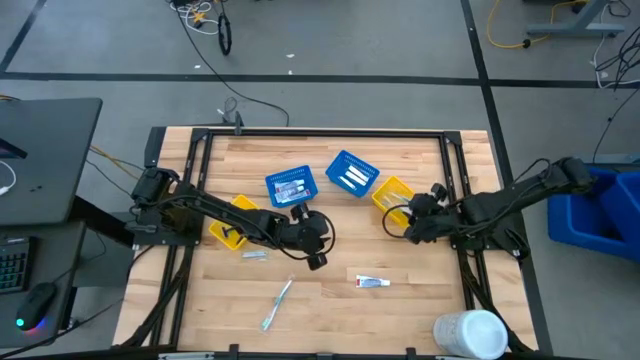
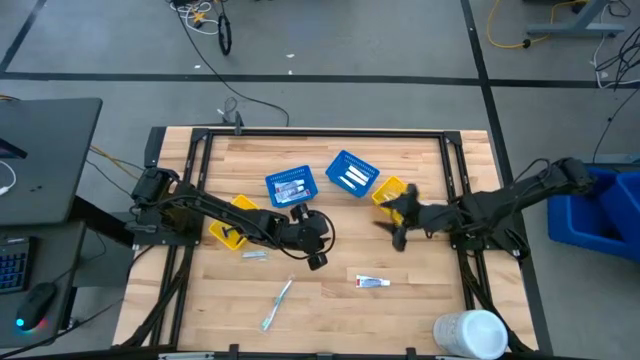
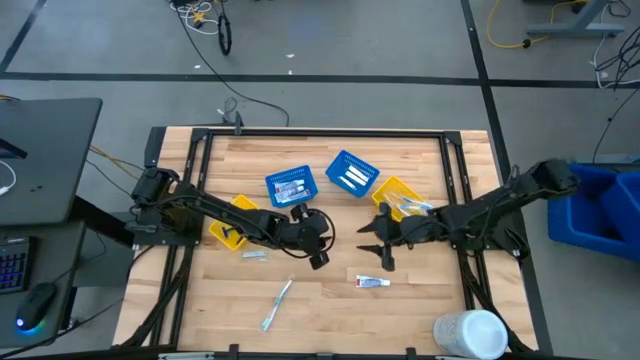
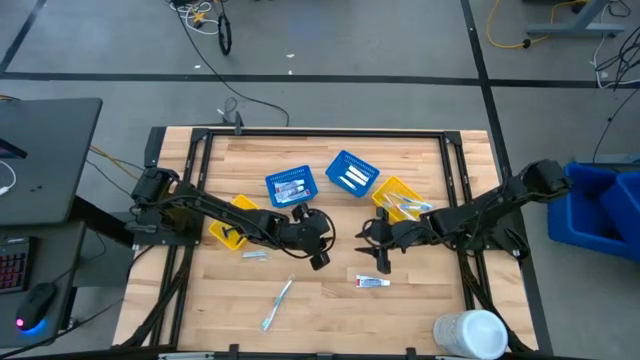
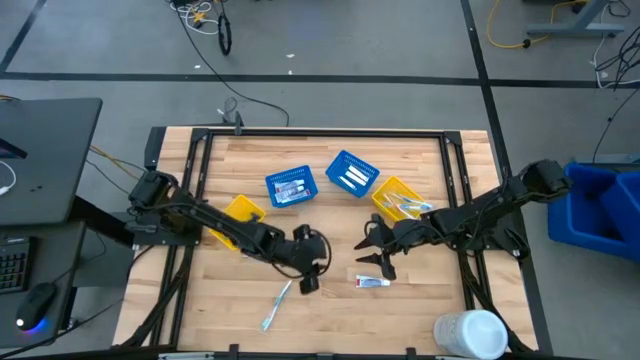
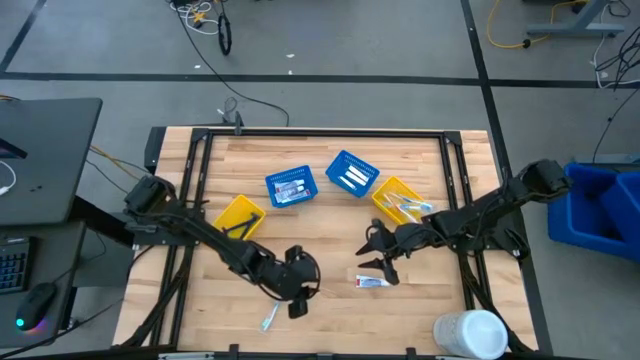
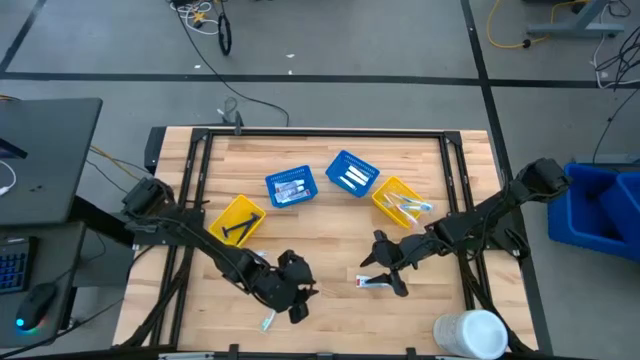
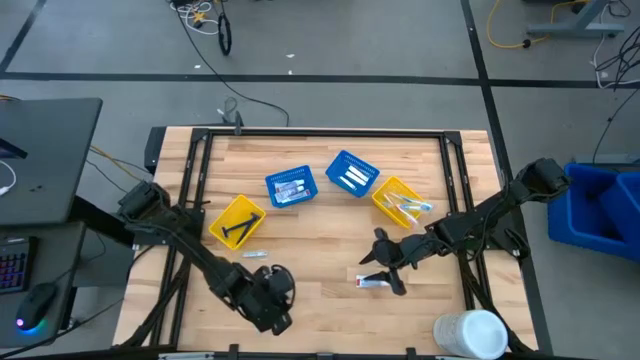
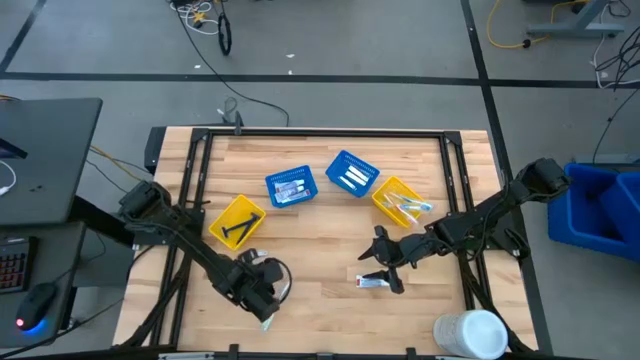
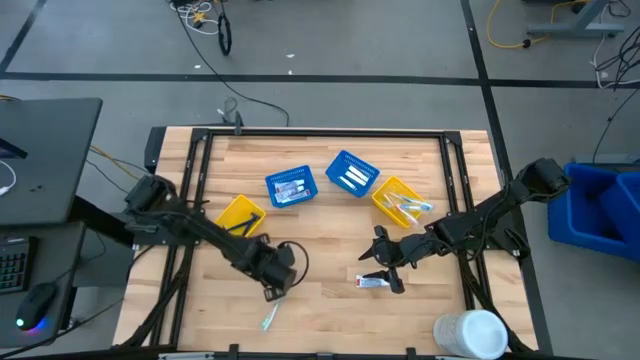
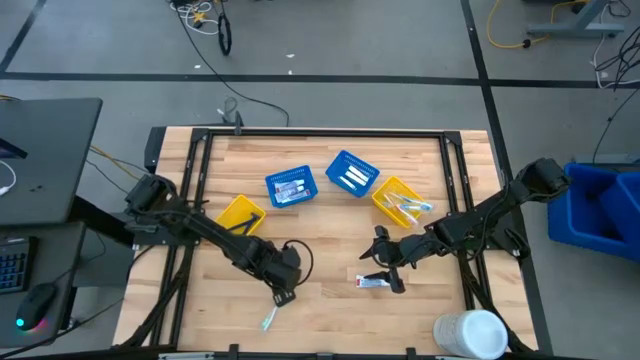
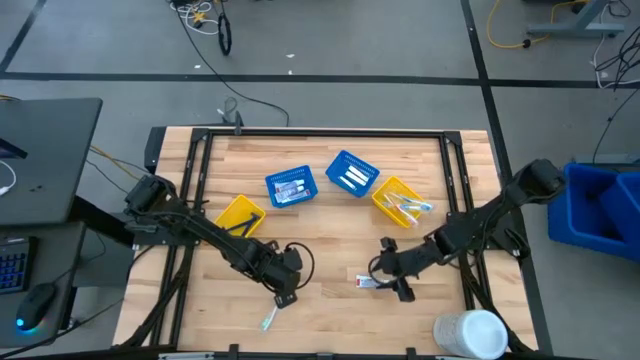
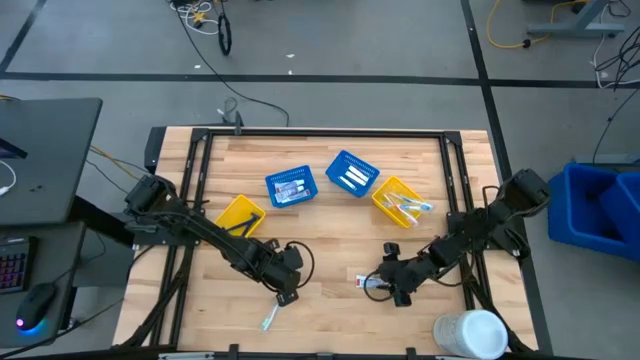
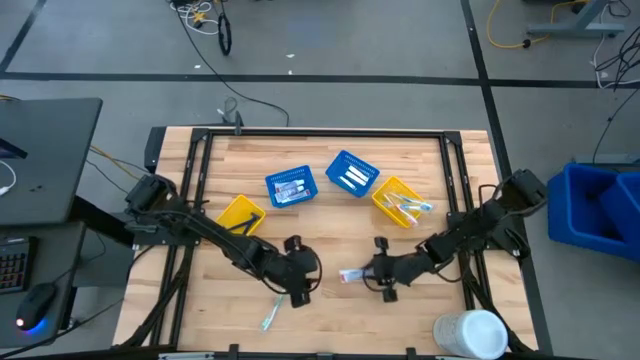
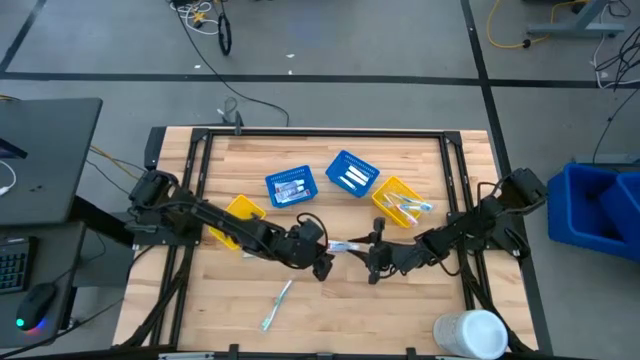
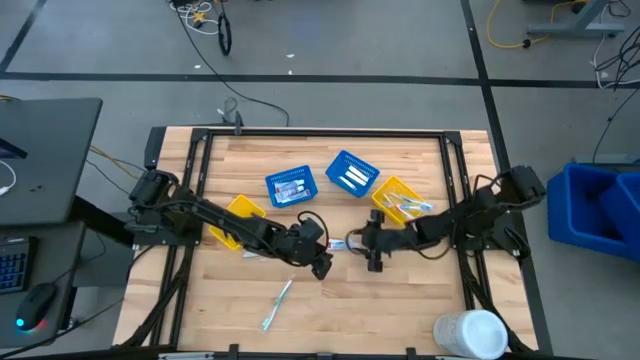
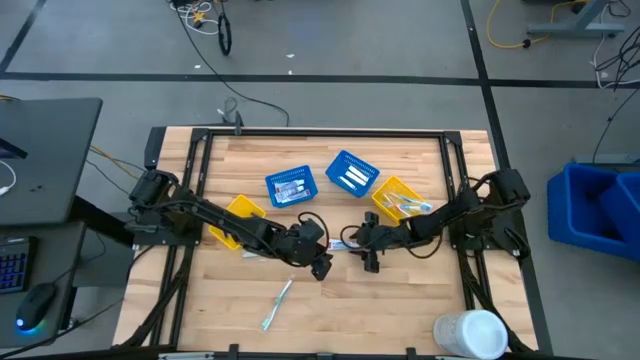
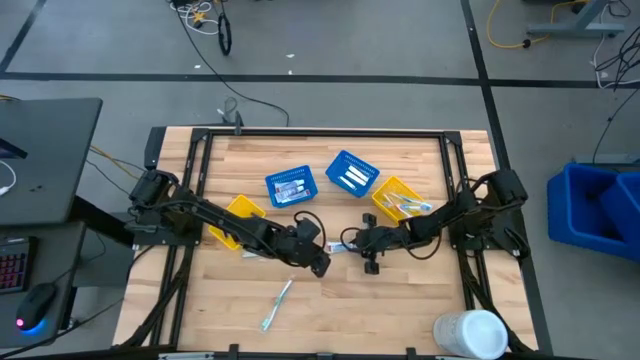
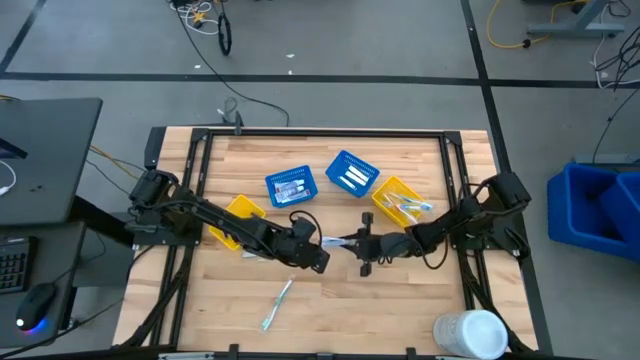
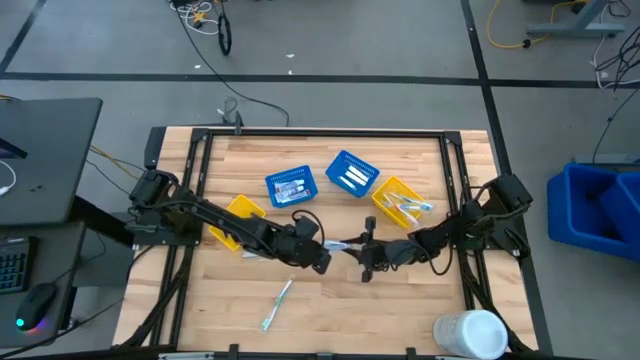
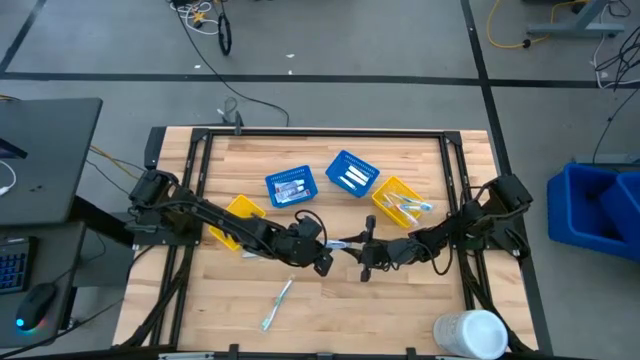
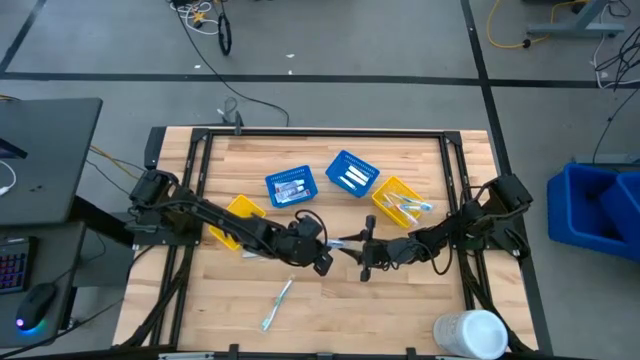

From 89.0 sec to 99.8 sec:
Task: Pick & Place Travel size toiletries
Put the white toothpaste into the left blue bin

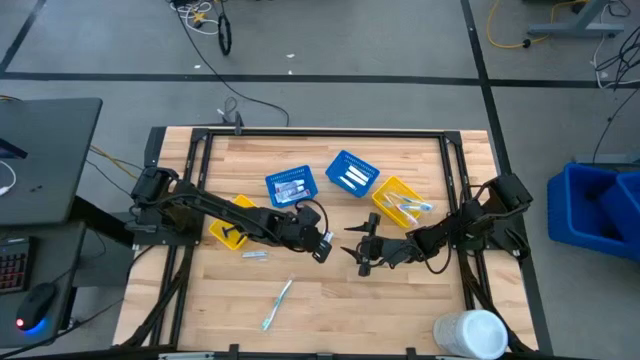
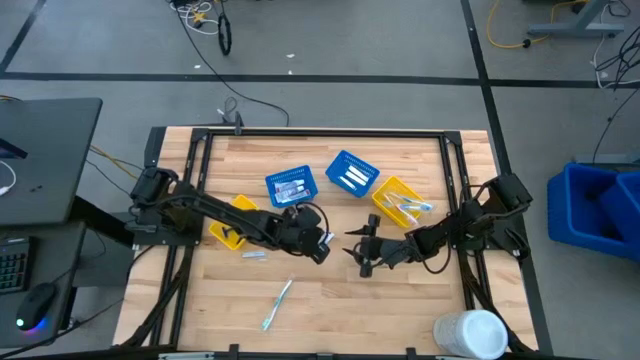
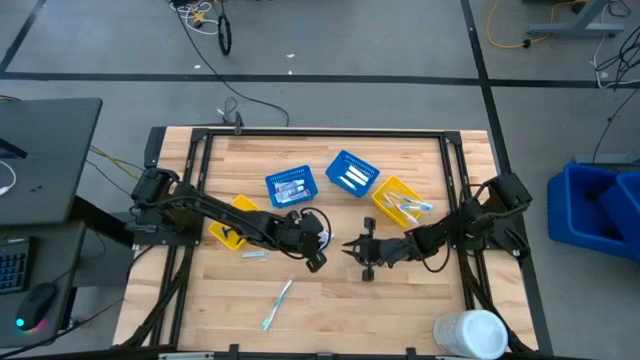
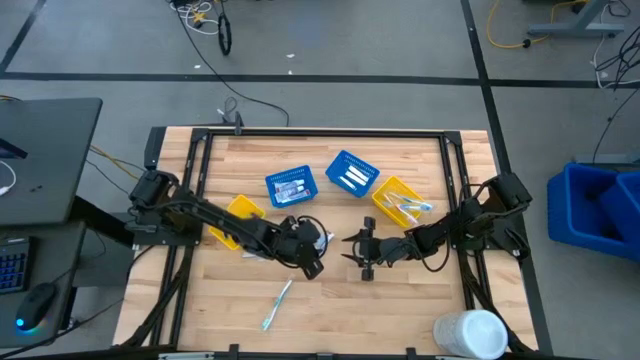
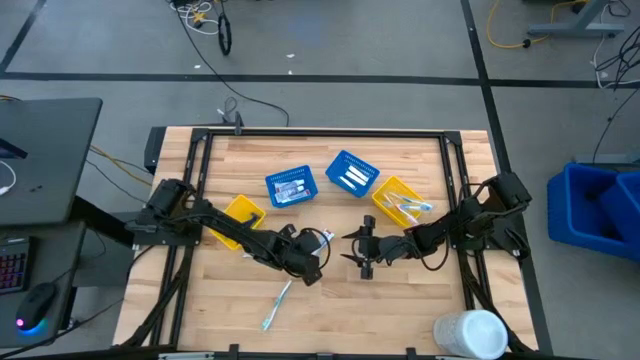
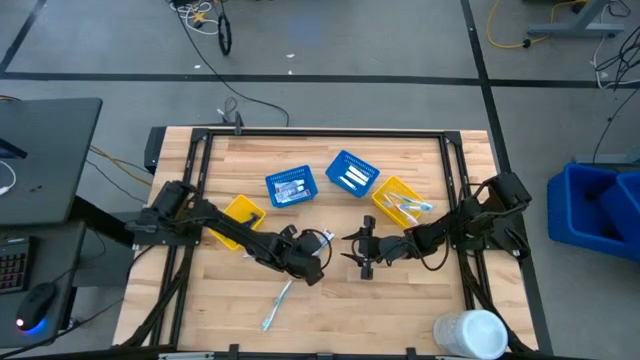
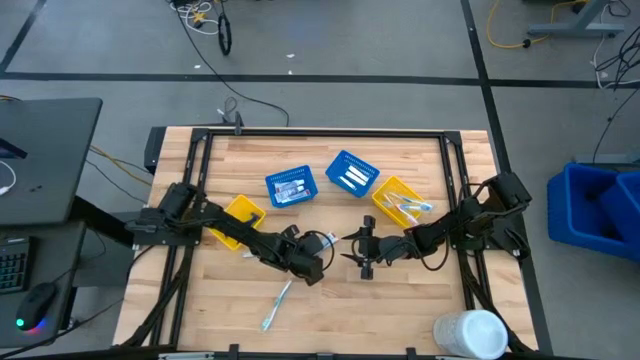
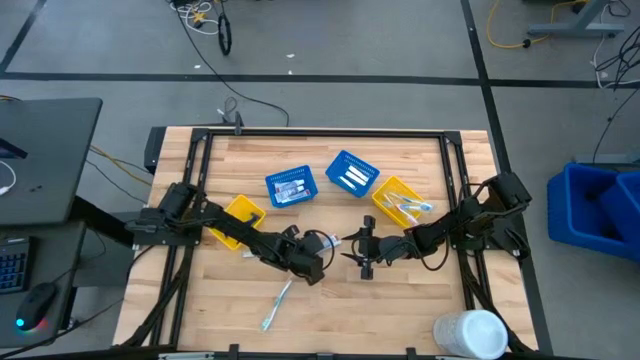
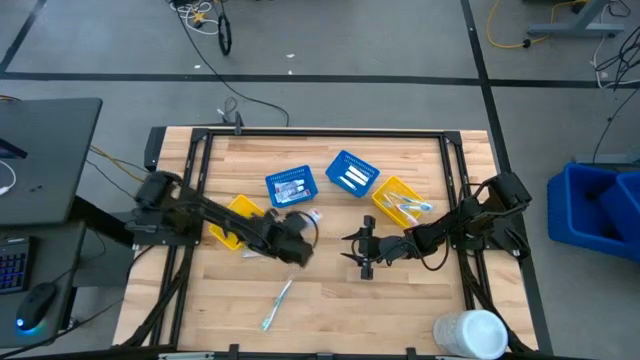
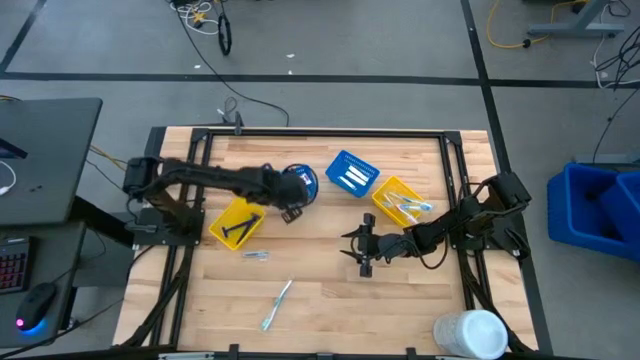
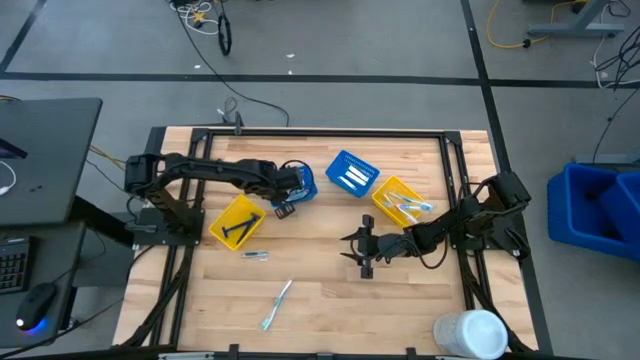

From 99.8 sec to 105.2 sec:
Put the white toothpaste into the left blue bin

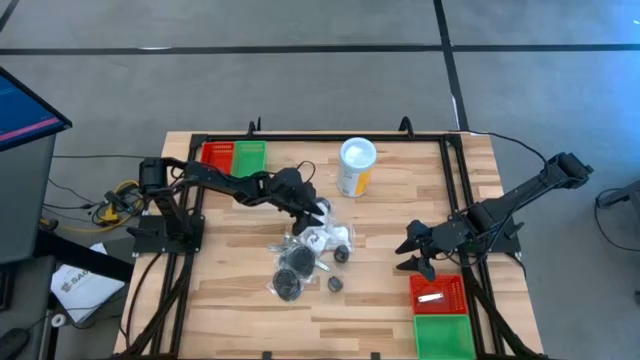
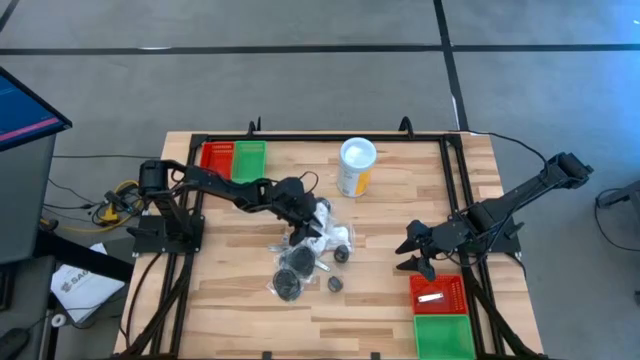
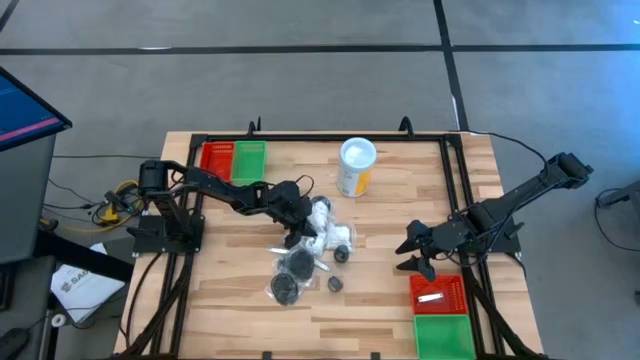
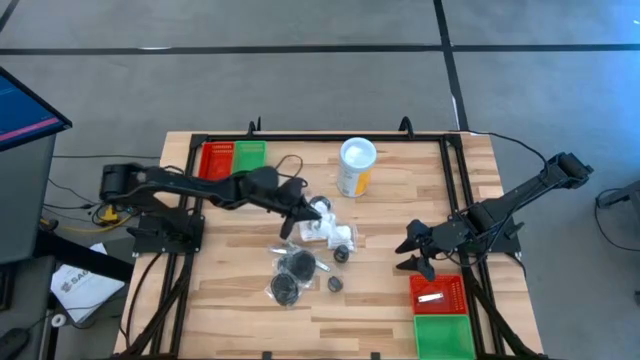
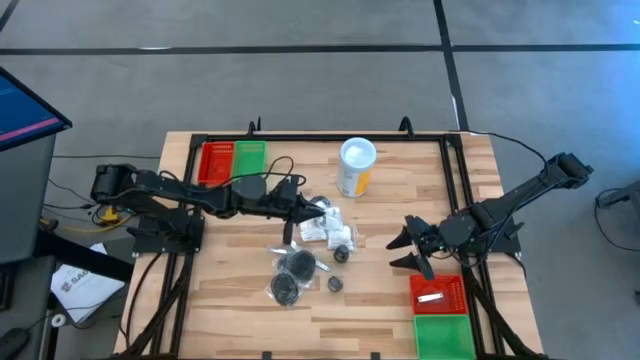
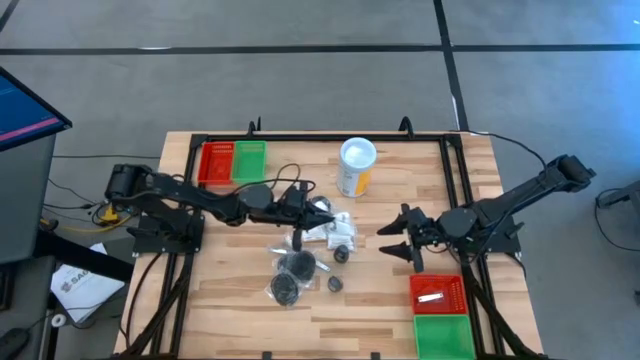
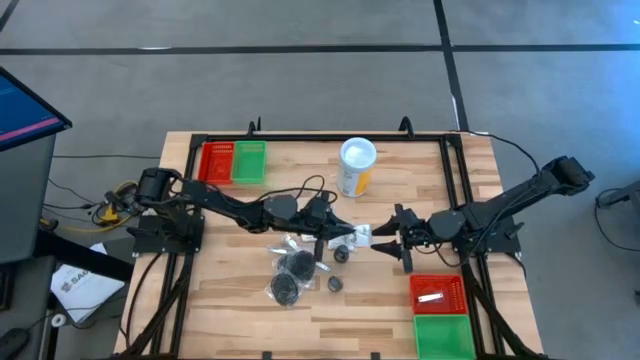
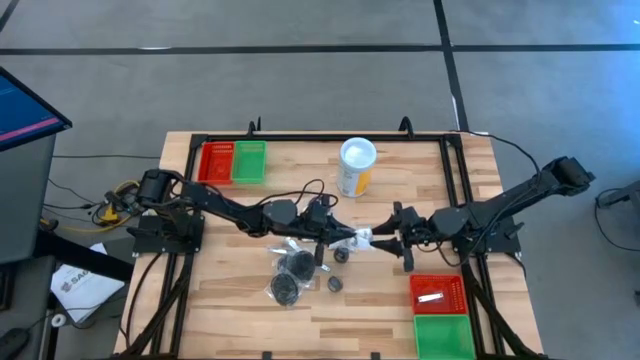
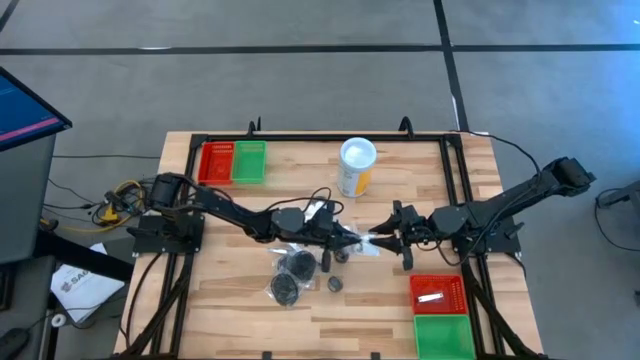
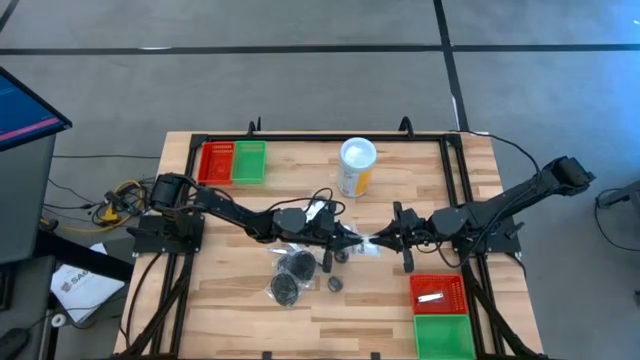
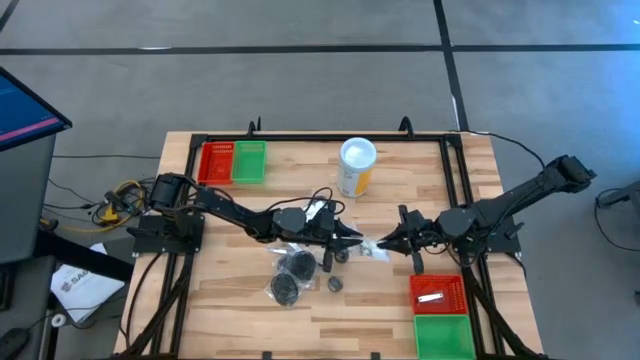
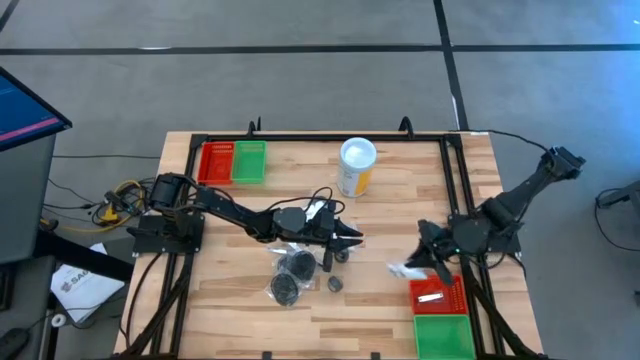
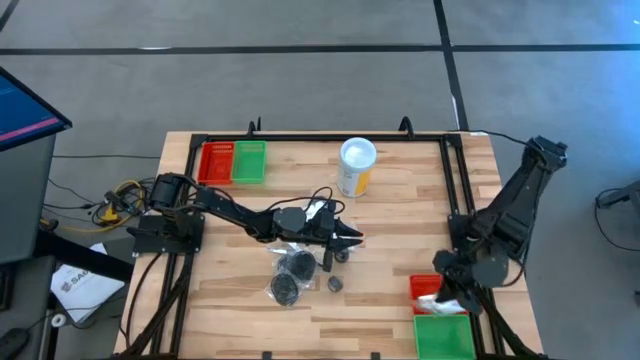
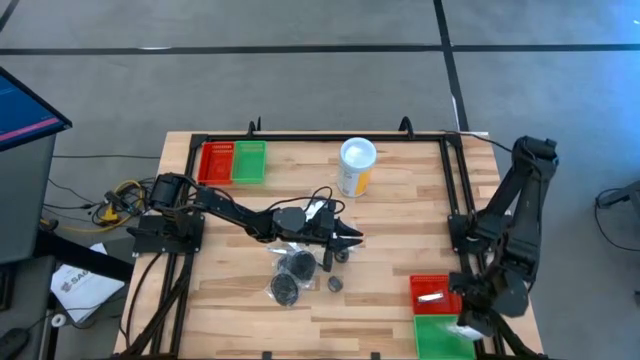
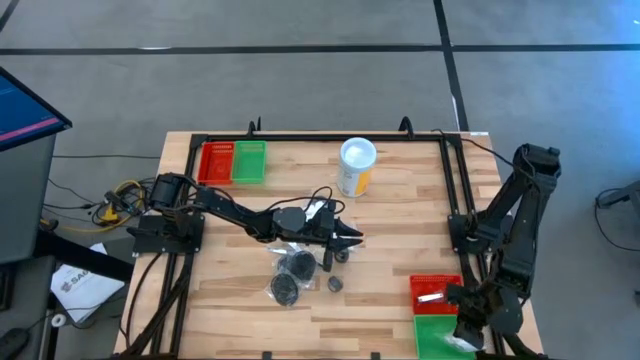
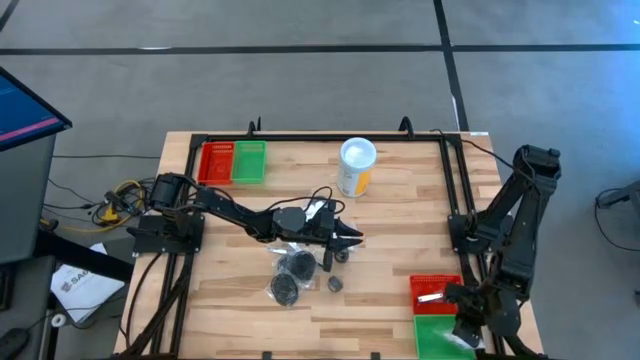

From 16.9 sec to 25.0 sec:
Task: Pick & Place Travel size toiletries
Put the white cotton pack into the bottom green bin
